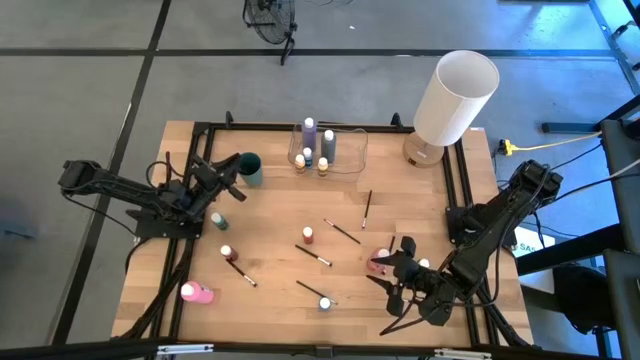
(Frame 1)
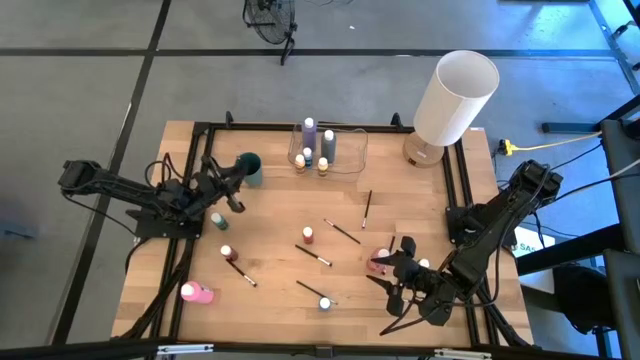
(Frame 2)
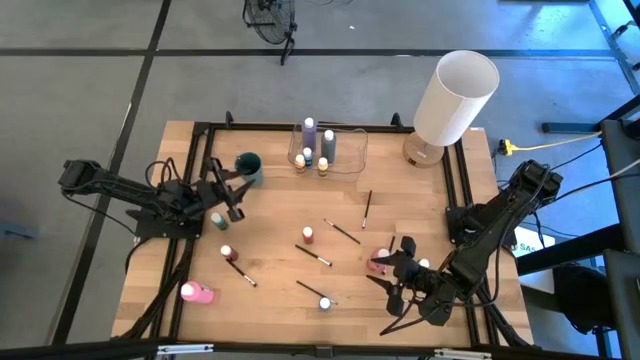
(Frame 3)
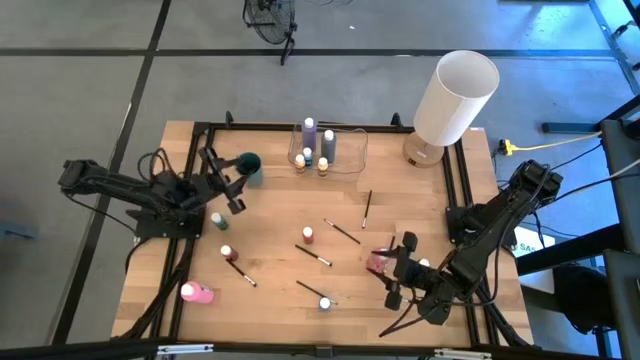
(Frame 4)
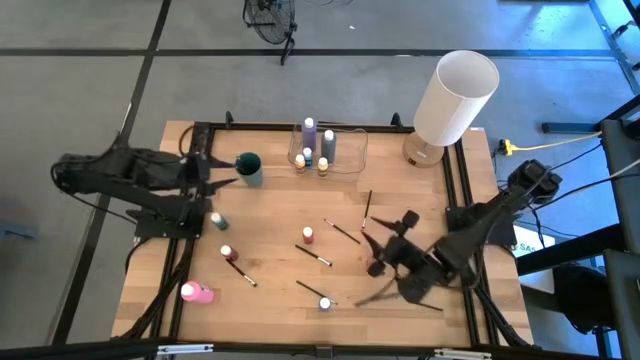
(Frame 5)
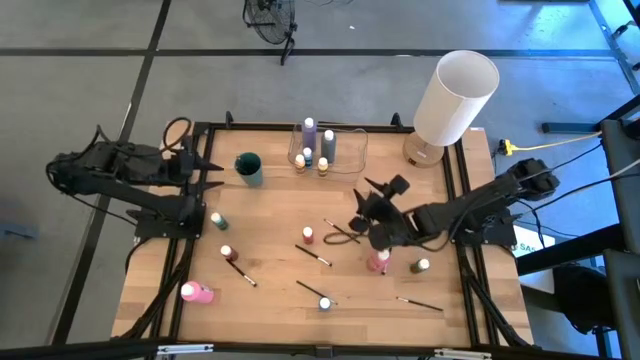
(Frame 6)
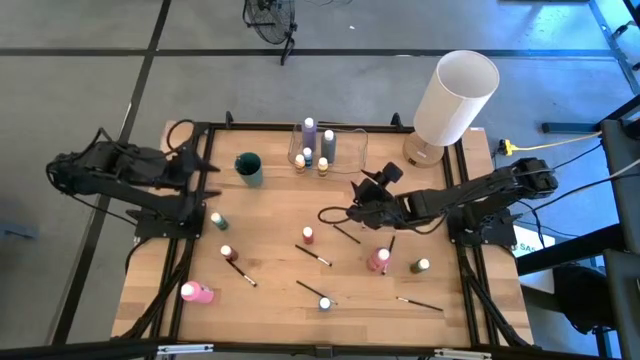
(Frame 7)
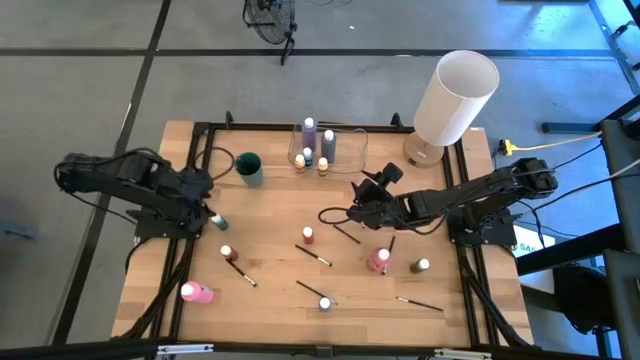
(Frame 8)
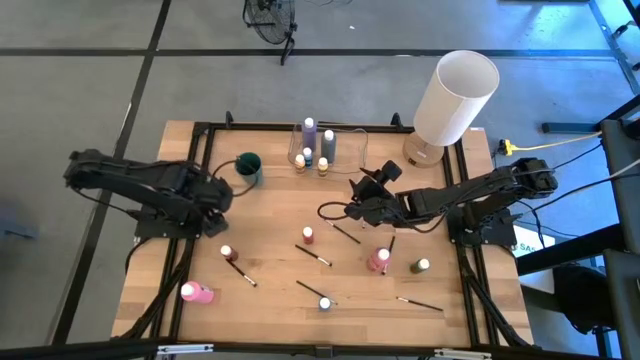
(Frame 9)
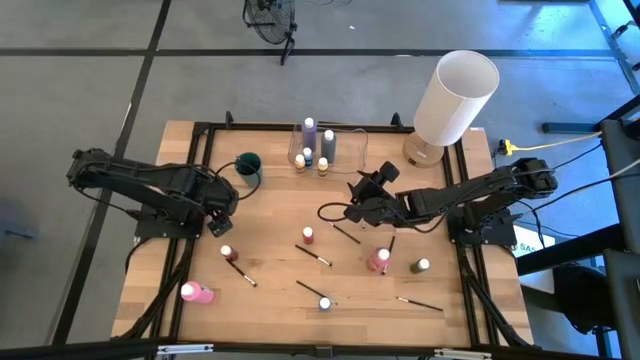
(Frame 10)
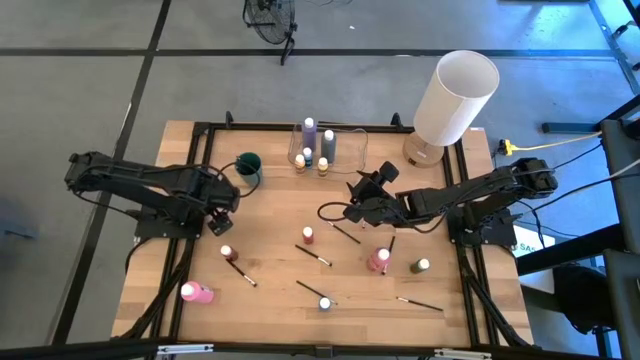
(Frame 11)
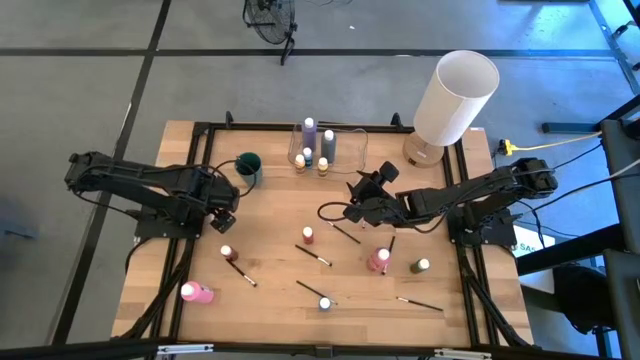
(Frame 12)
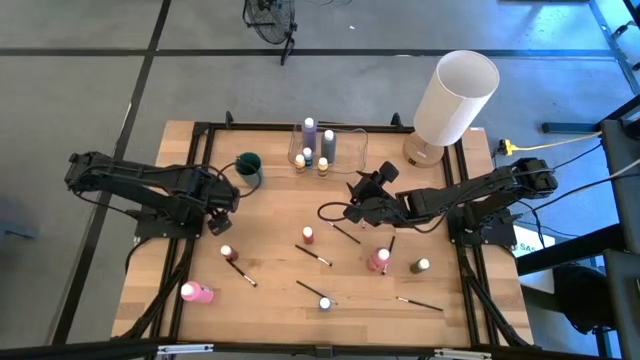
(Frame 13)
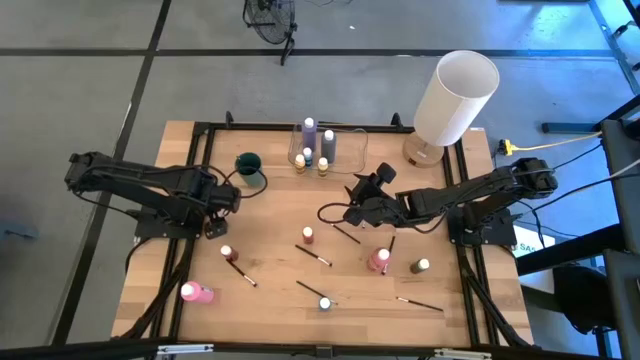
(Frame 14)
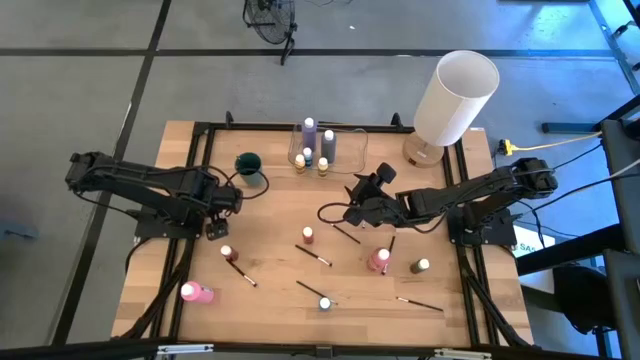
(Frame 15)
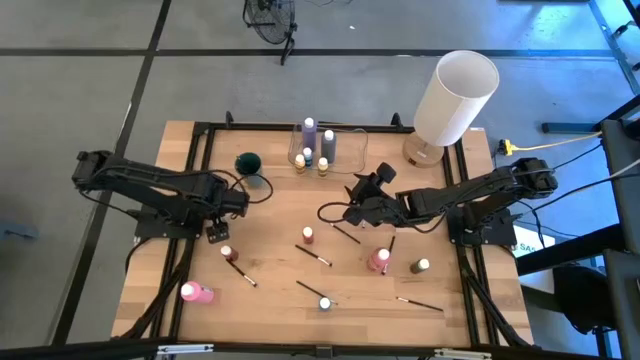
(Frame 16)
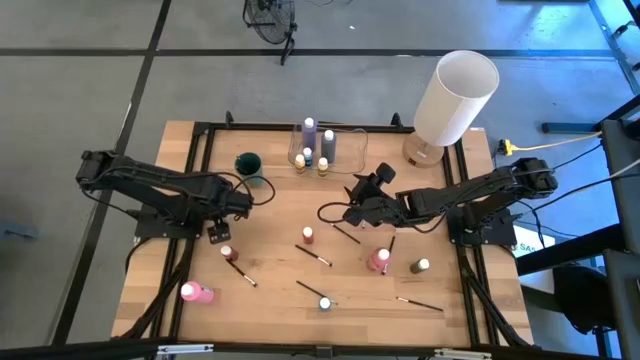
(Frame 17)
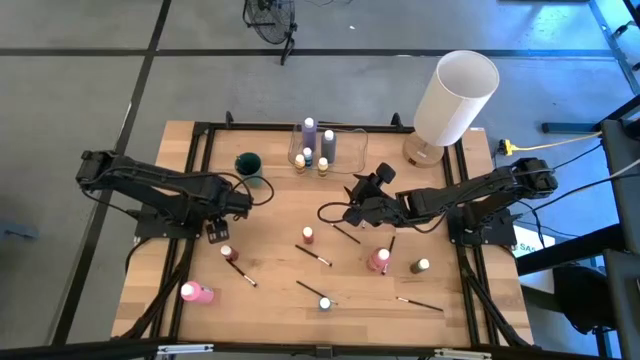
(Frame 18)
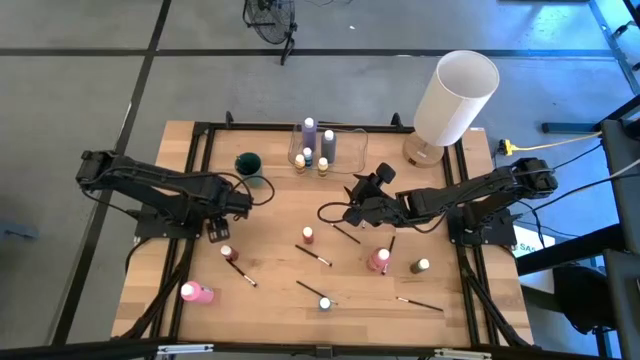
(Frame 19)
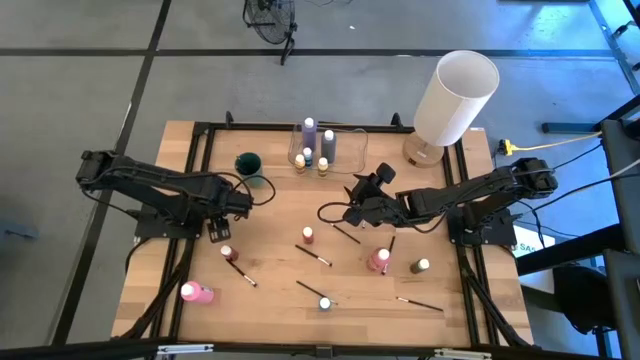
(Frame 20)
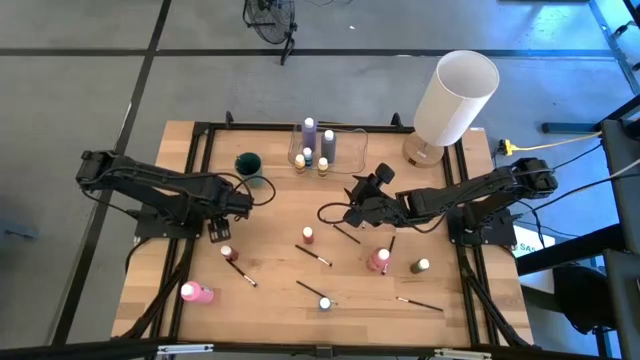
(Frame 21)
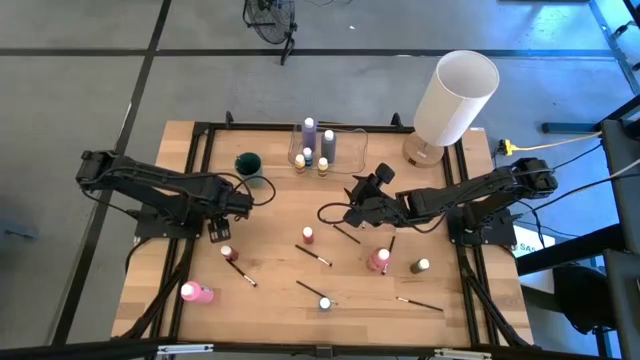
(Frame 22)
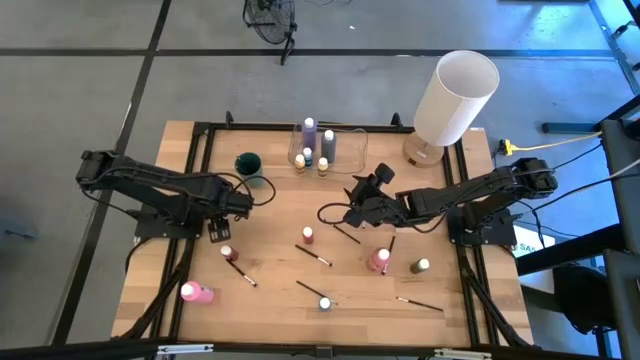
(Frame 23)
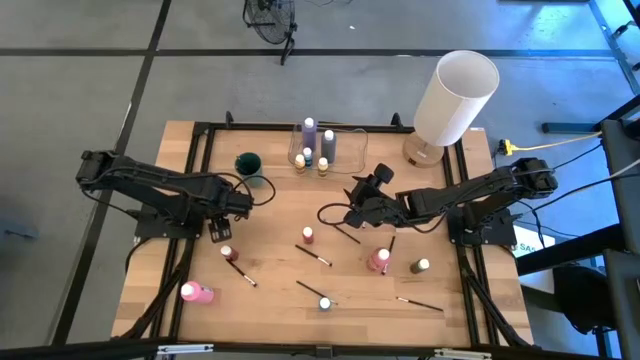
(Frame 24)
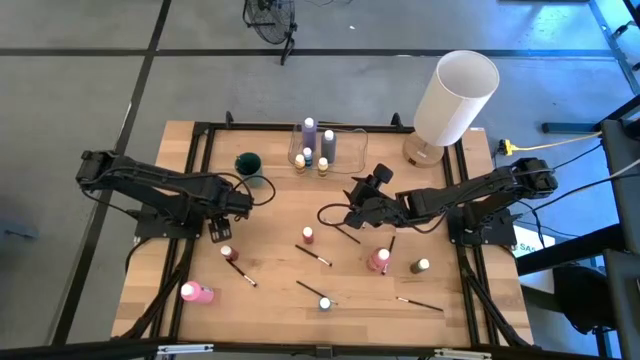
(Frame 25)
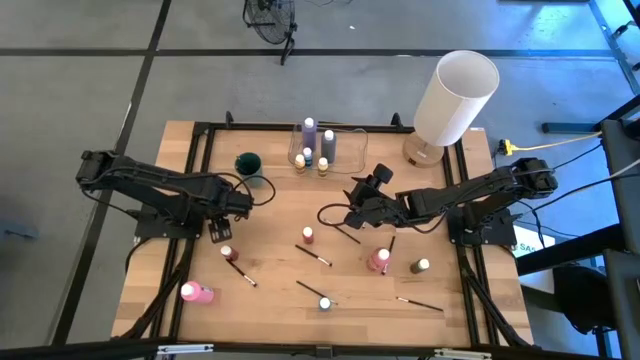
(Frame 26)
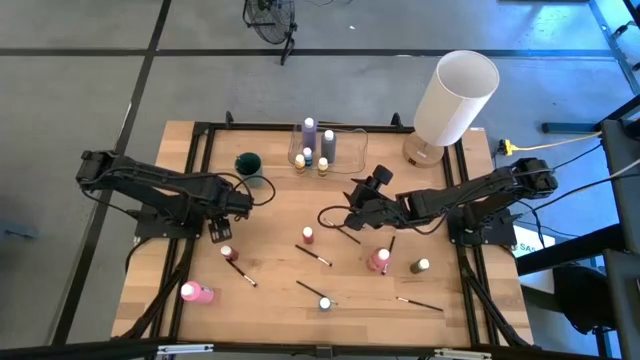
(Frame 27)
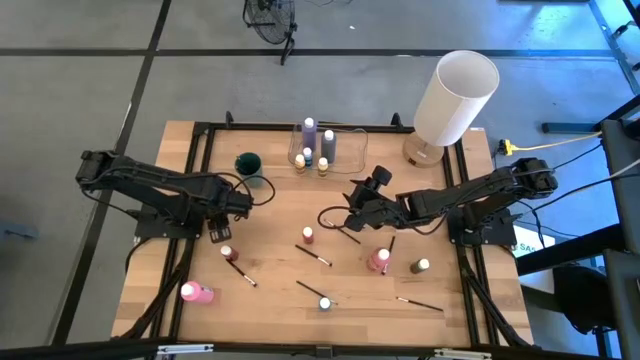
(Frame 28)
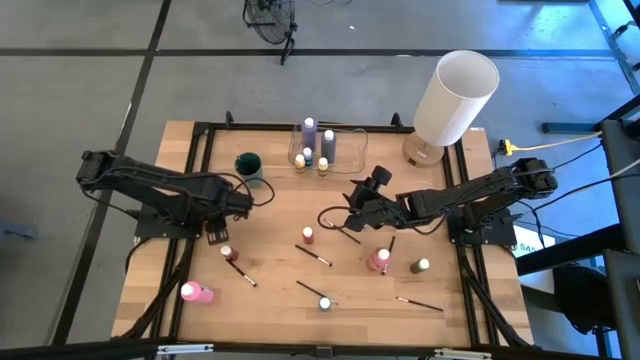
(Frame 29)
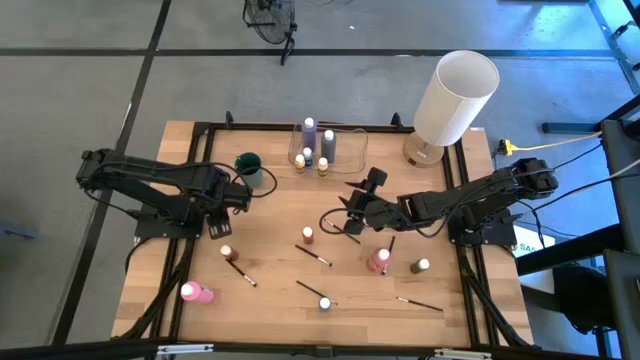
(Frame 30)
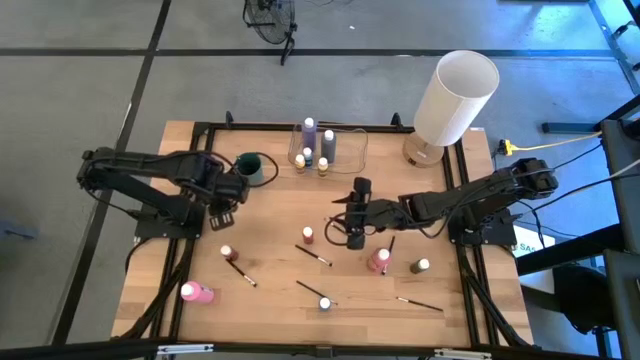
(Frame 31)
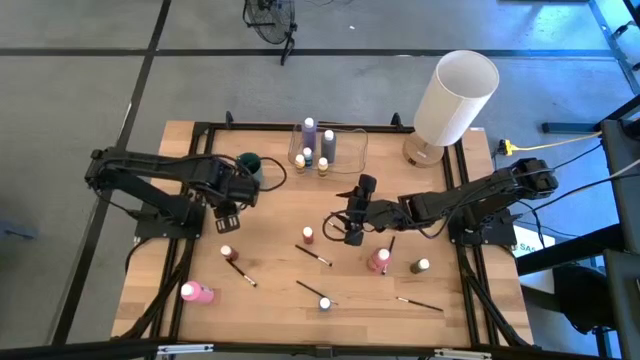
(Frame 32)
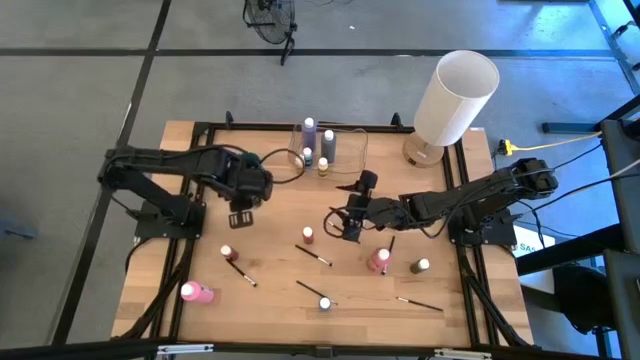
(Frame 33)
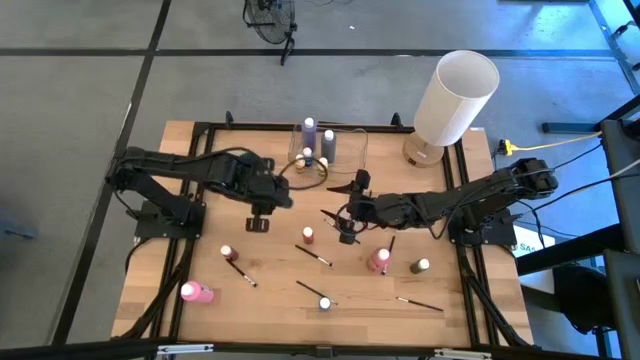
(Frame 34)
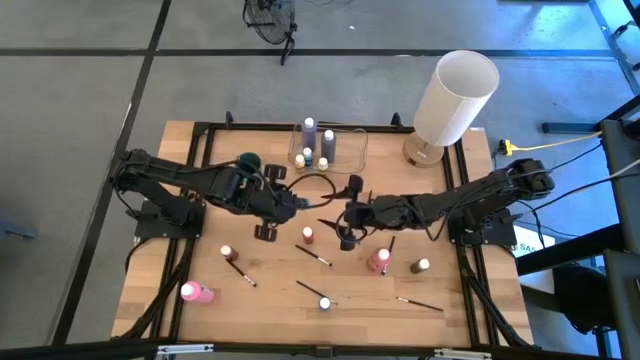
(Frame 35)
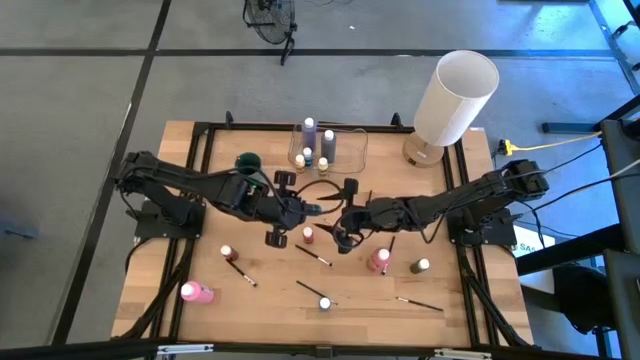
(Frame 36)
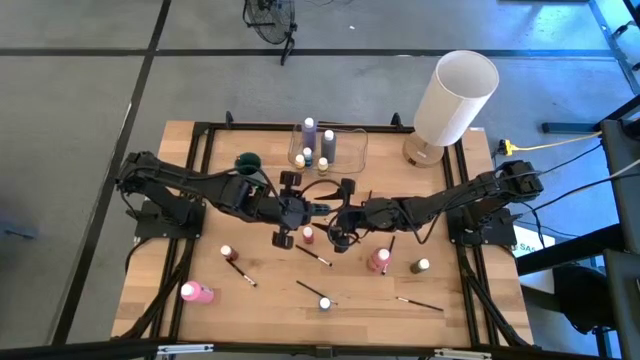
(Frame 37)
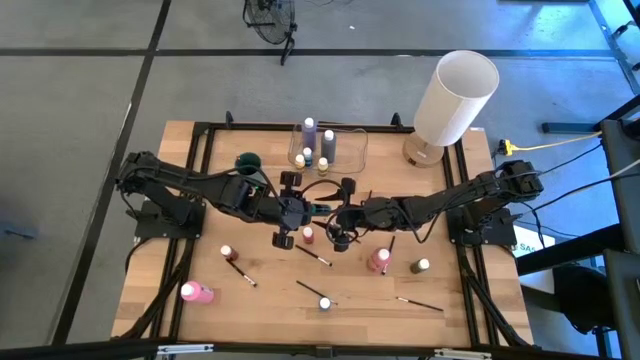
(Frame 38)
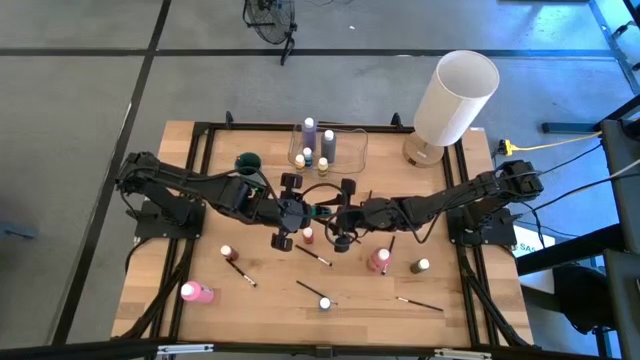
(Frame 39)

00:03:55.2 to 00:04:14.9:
Task: Pick & Place Paint Supplies
Put the green paint bottle into the transparent bin

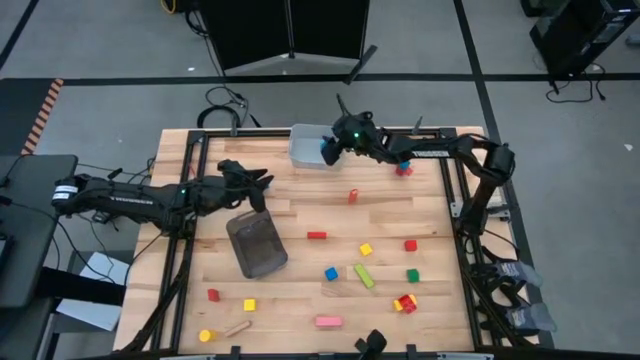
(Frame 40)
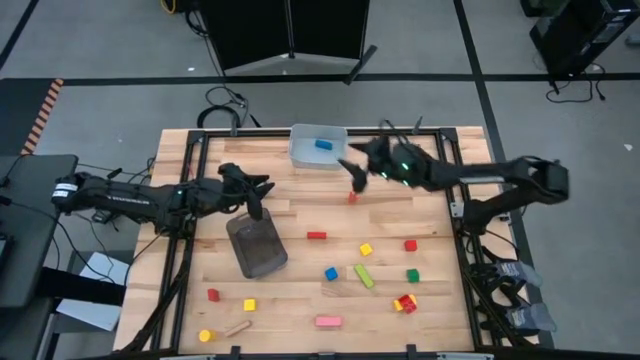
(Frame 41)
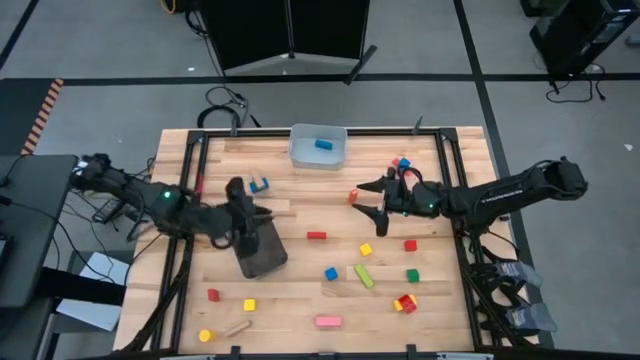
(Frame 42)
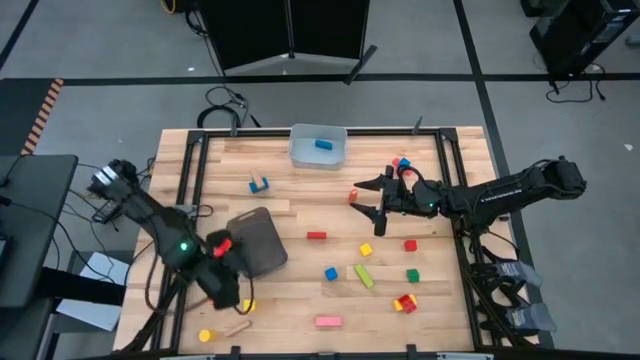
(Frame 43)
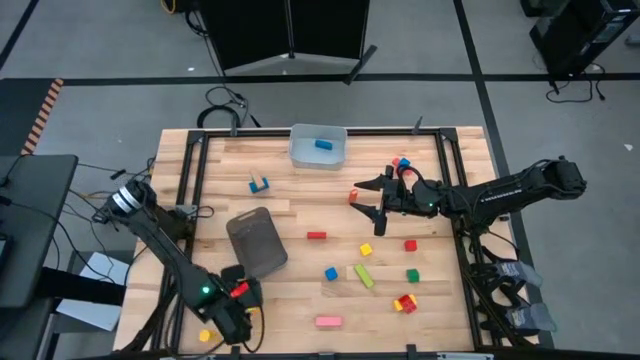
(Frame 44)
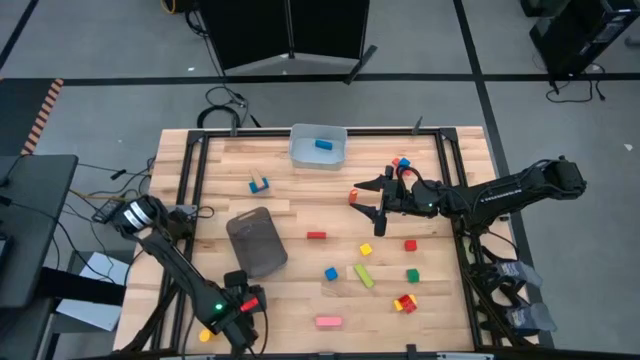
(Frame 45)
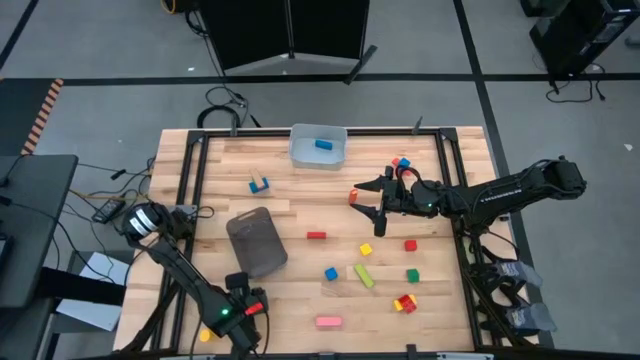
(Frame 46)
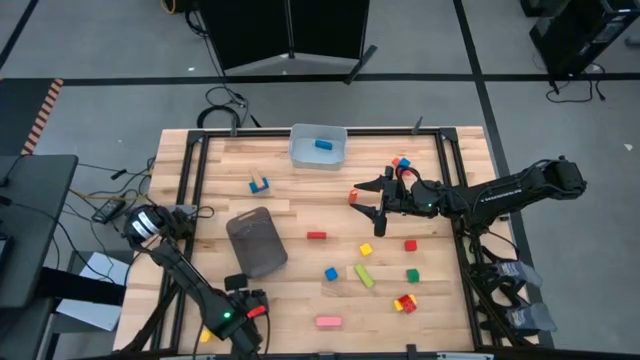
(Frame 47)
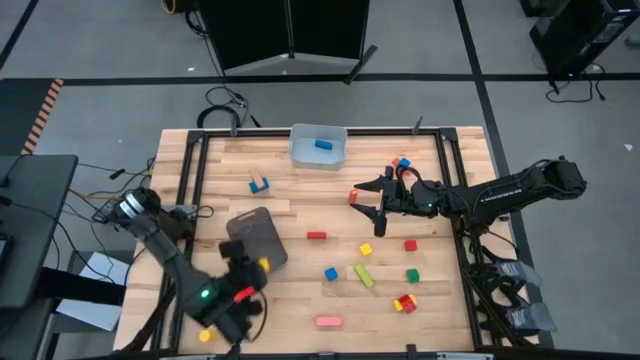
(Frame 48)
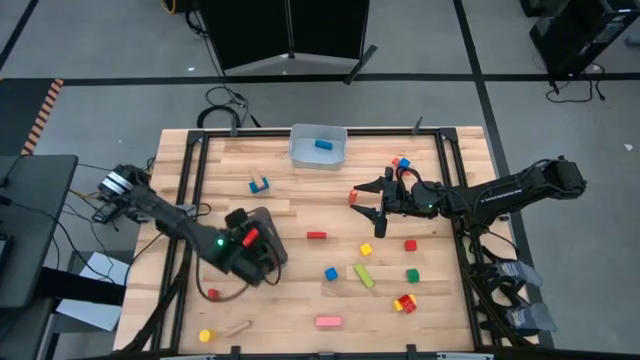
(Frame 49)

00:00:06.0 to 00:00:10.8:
Task: Sort blocks by size
Put the yellow square block into the black bin
